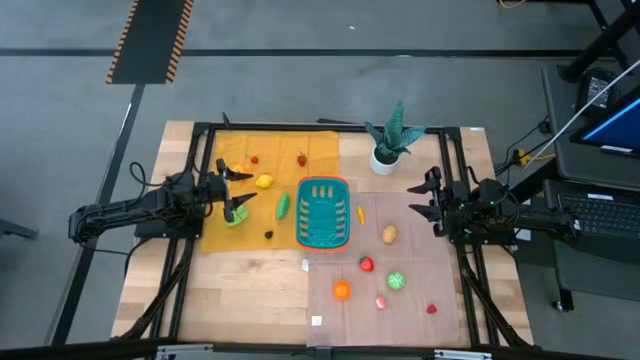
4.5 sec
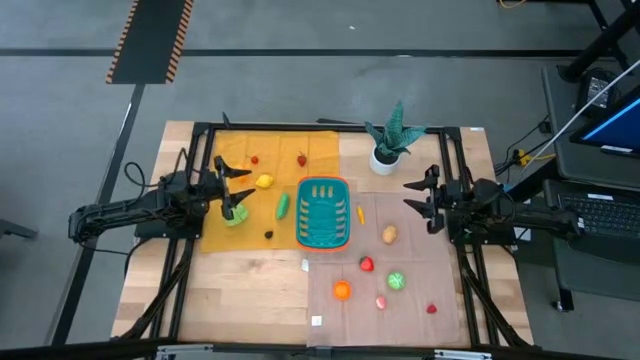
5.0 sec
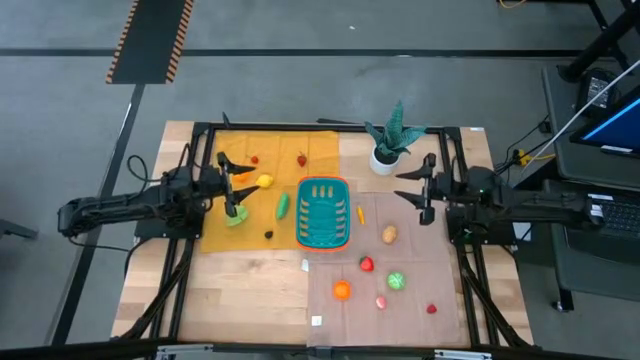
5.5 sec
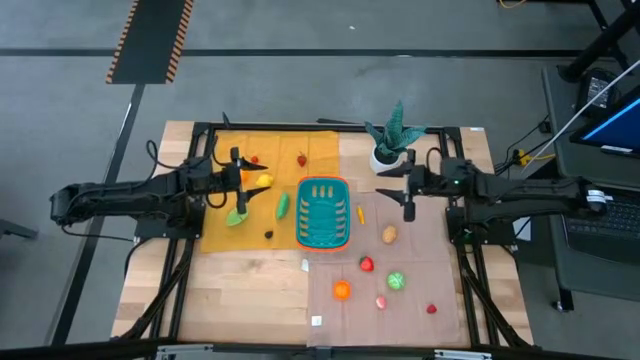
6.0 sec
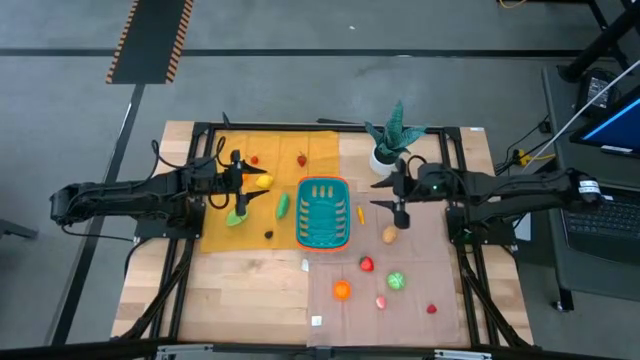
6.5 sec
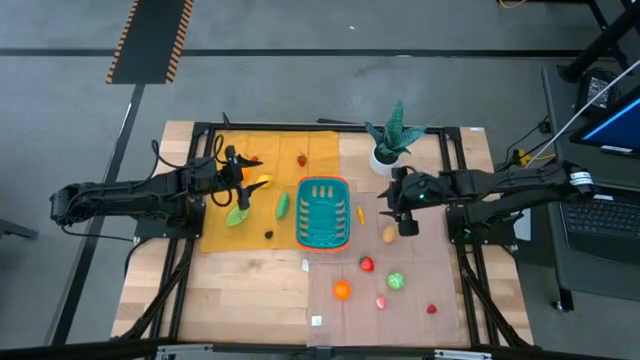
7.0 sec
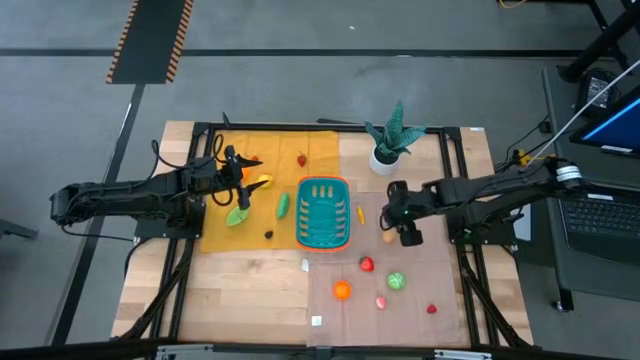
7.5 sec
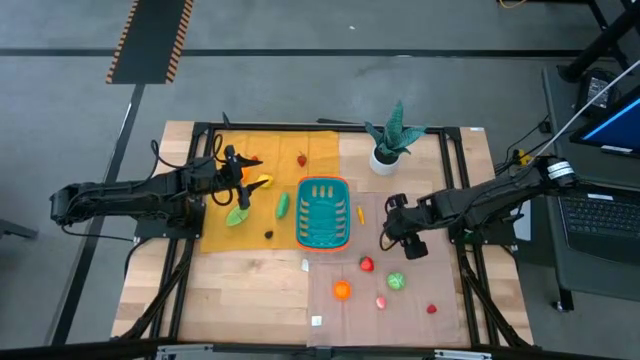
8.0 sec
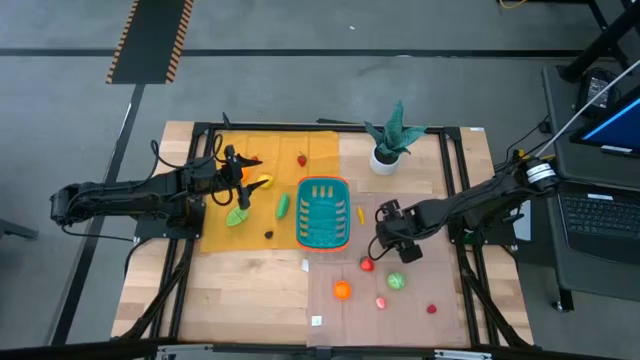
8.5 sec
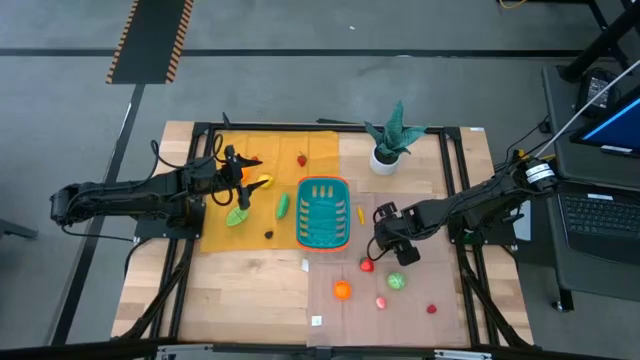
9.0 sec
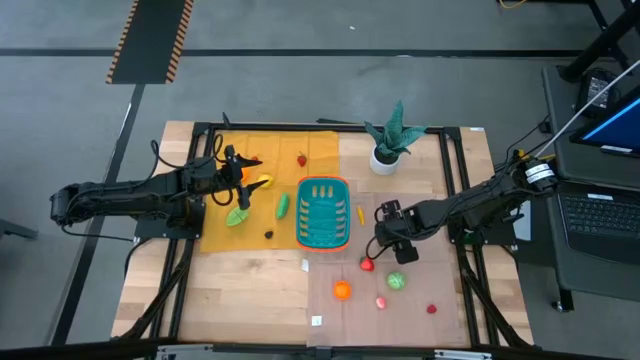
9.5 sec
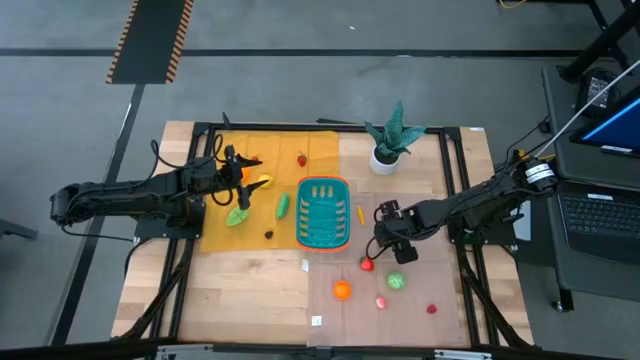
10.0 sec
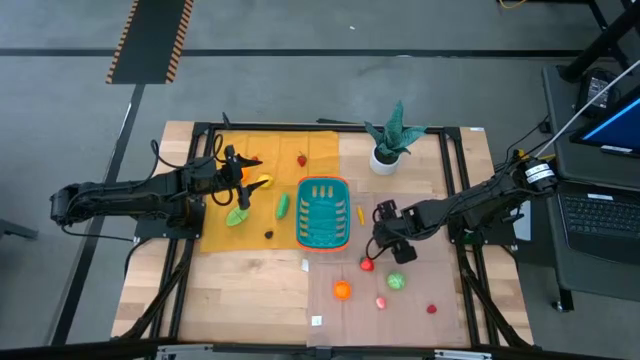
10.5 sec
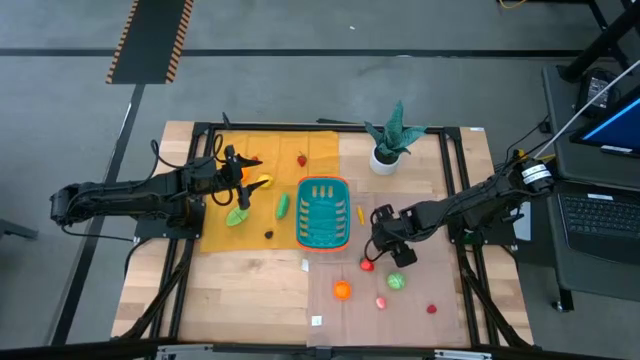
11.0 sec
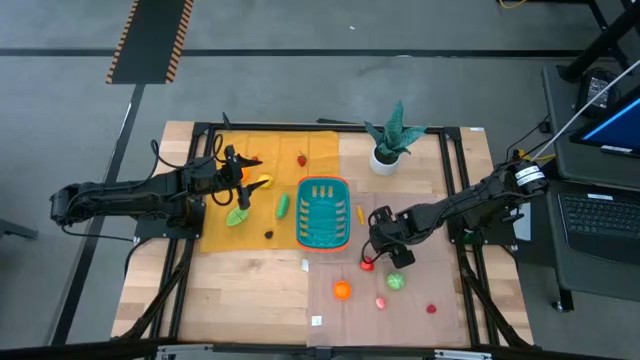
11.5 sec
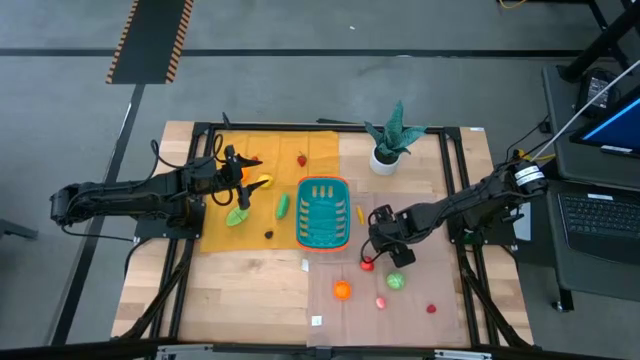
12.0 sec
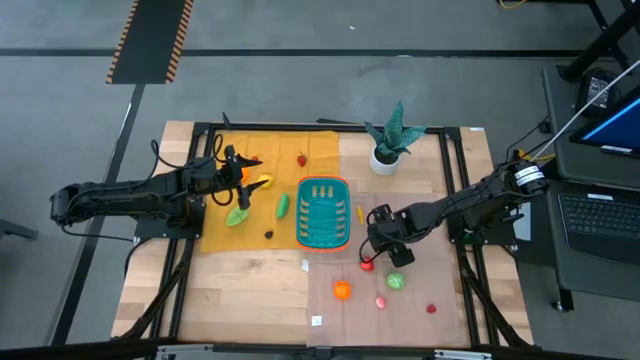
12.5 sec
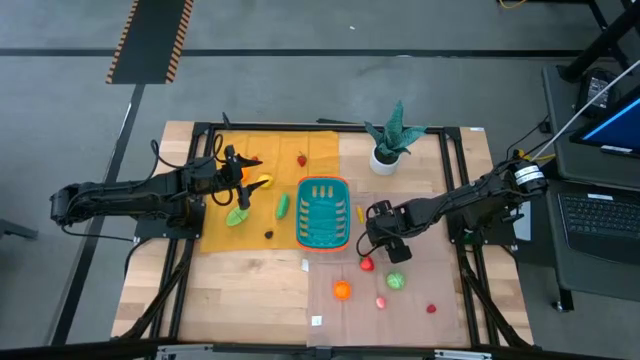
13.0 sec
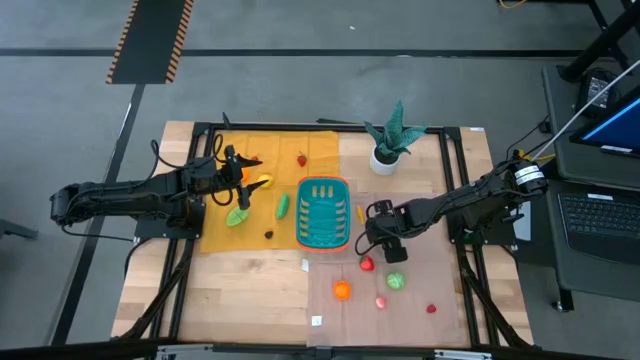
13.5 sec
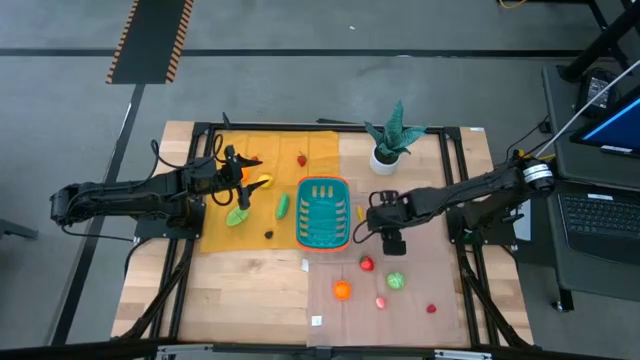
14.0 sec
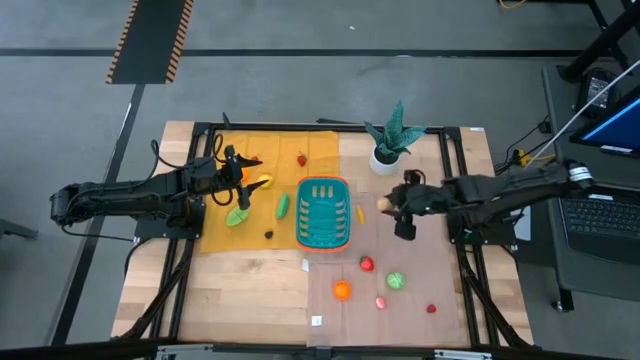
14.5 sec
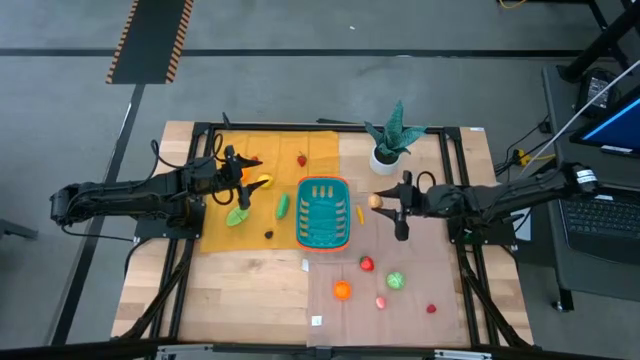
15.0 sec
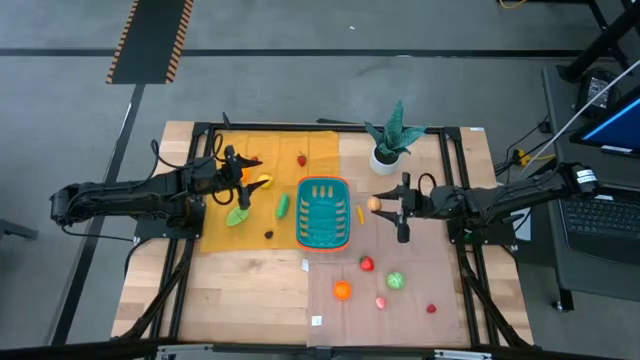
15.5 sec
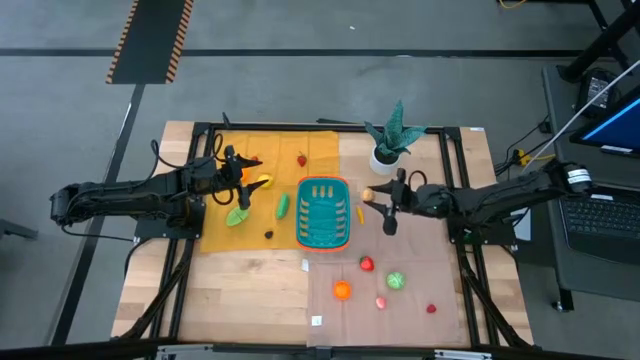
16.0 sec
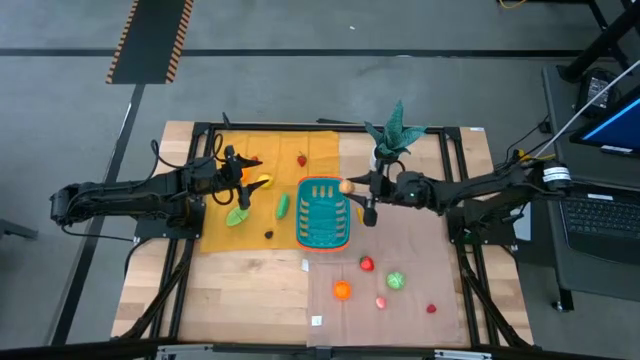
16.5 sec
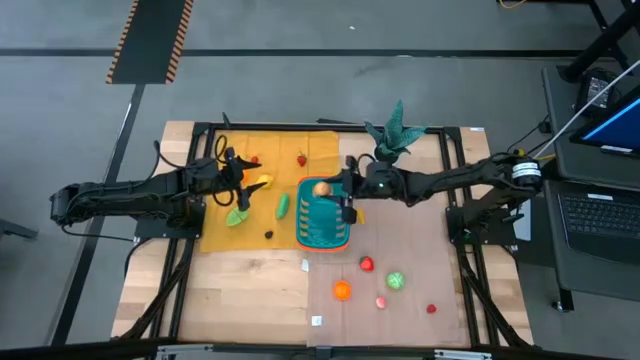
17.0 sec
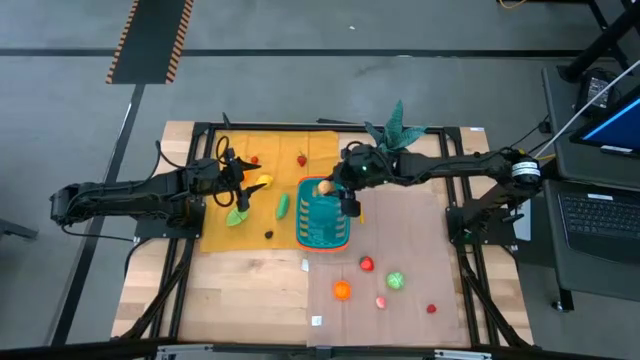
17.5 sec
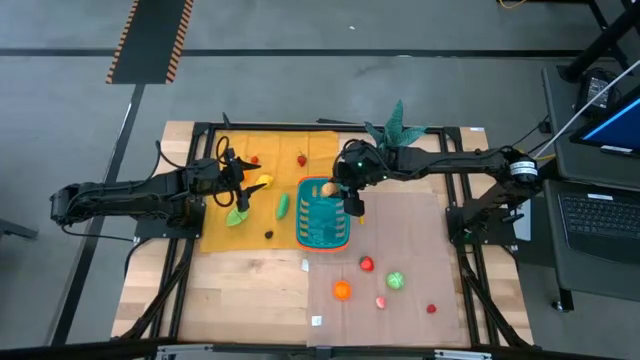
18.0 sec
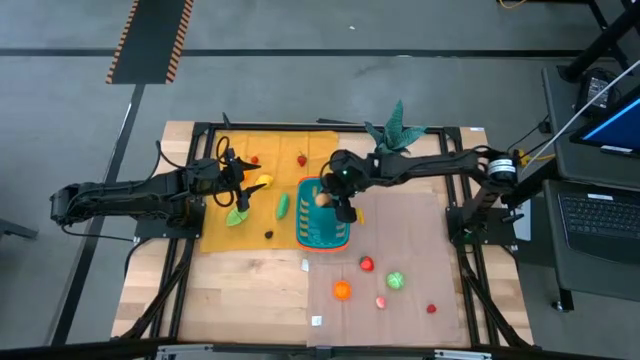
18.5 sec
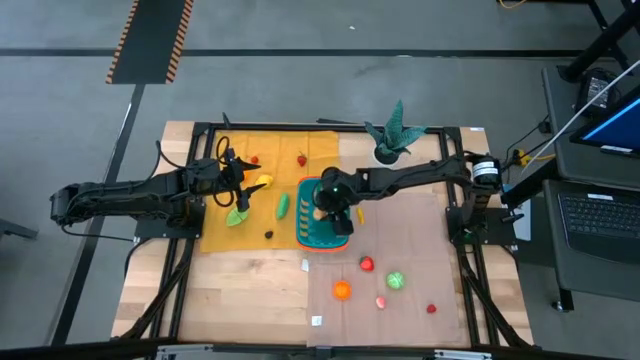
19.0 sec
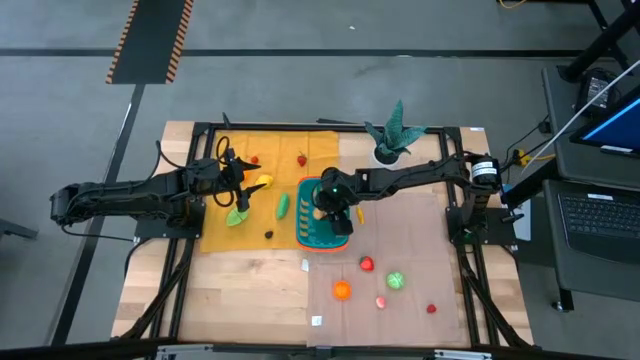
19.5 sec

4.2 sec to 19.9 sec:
Task: Pick and placing Produce into tupperware
Put the potato into the basket

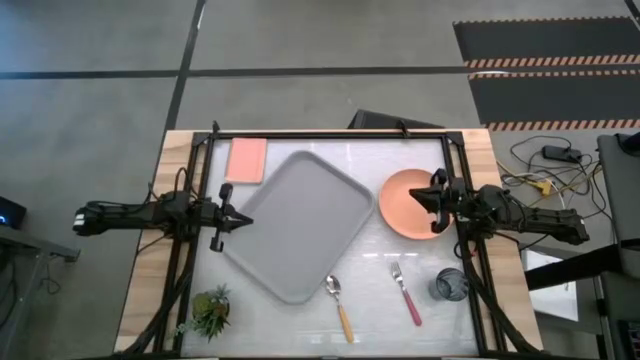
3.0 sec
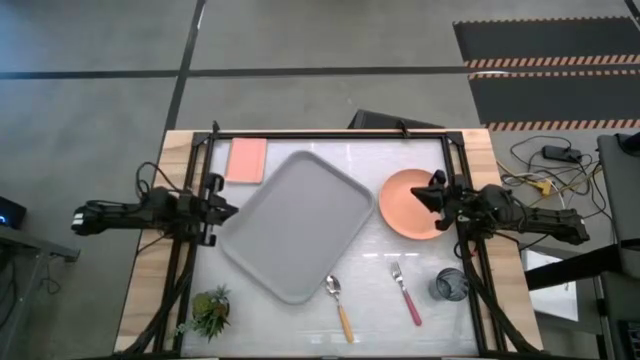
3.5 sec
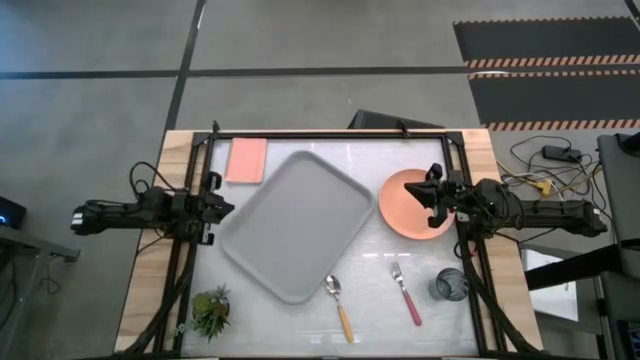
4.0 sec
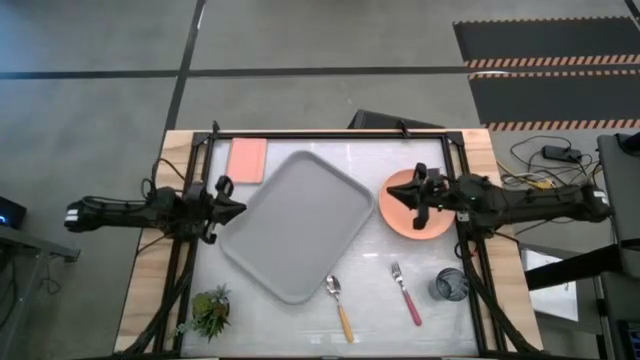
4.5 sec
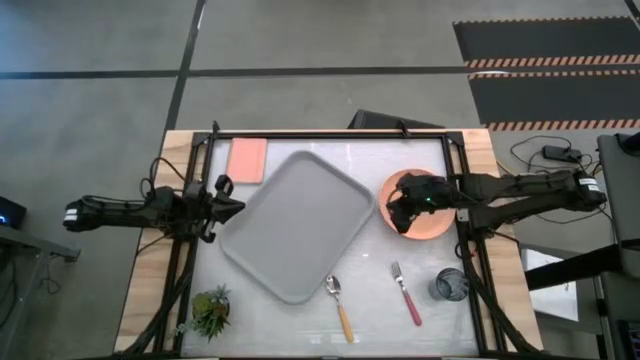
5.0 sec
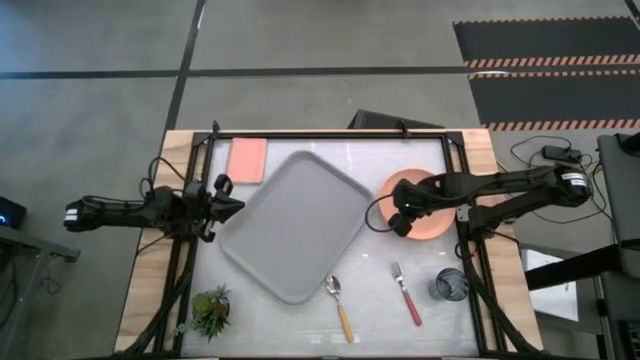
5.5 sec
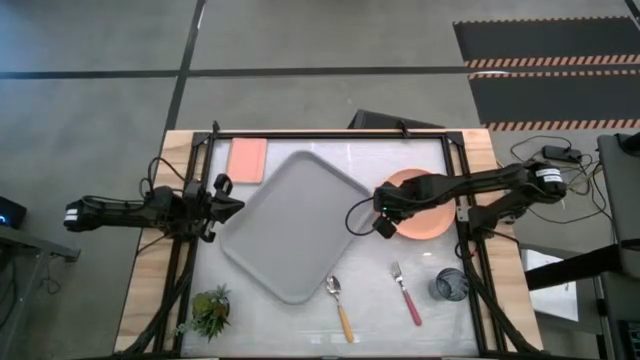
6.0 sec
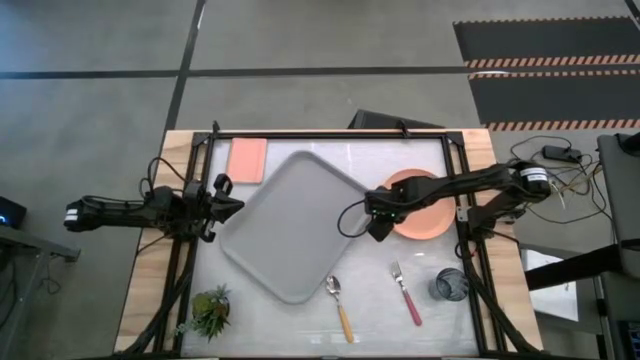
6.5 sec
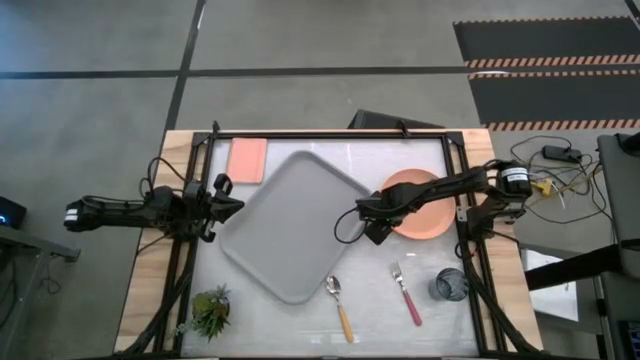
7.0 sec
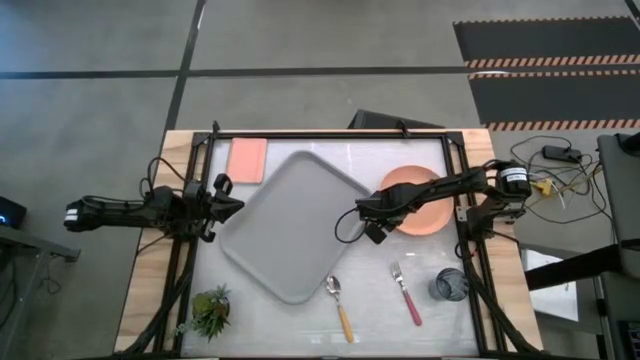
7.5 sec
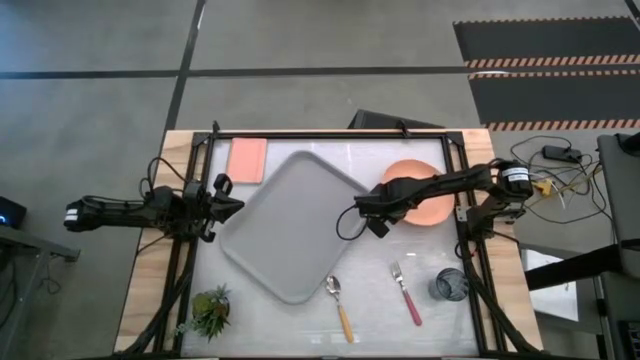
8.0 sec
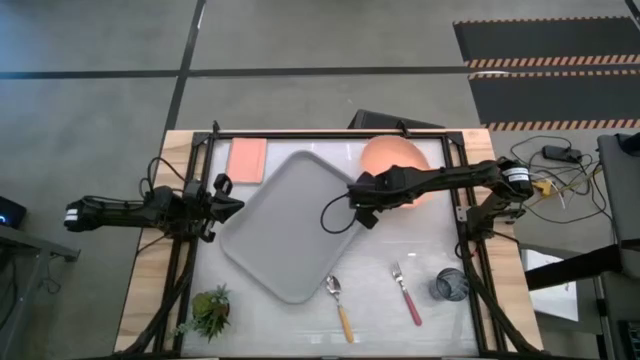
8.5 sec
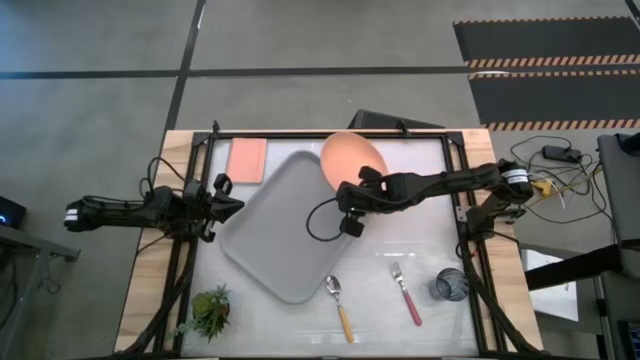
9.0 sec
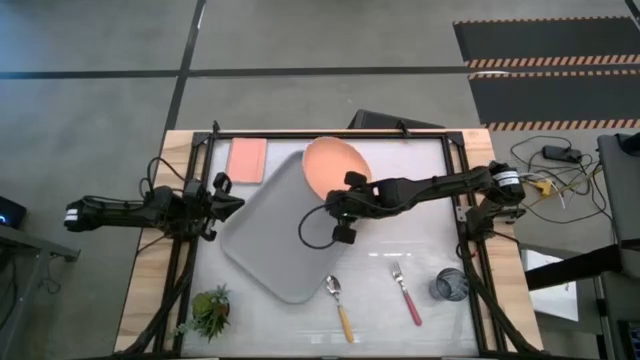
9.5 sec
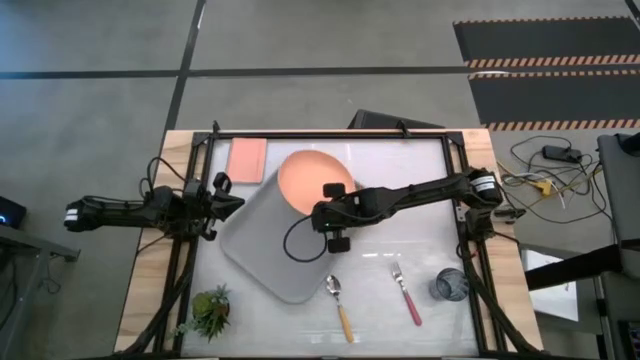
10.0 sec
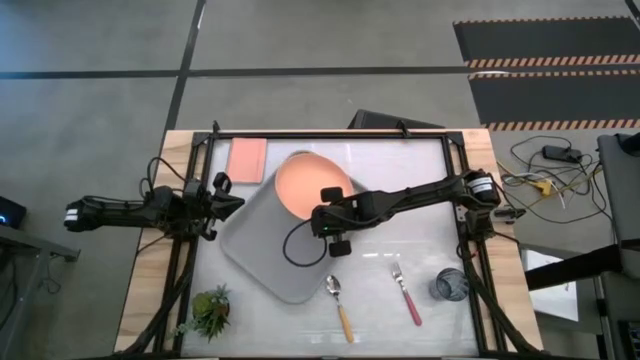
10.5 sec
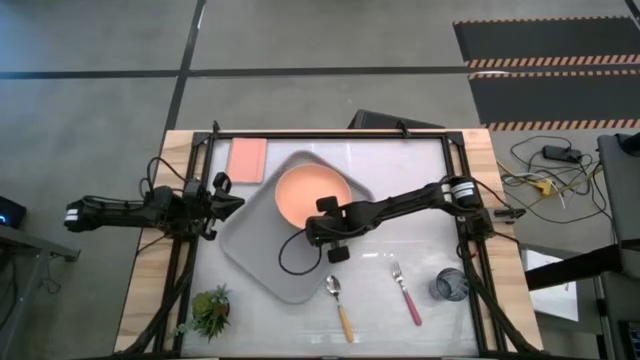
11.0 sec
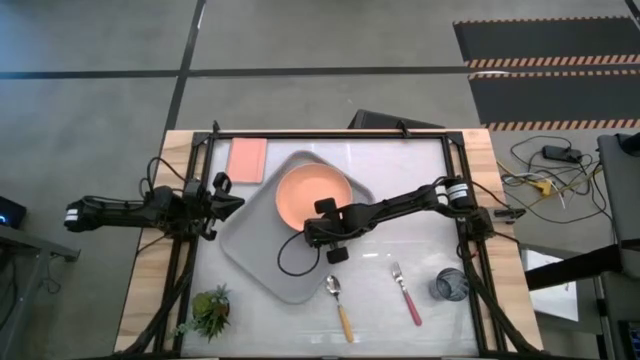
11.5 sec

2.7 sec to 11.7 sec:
Task: Pick and place plate/cup/fork/spoon on tray
Put the orange plate on the gray serving tray
